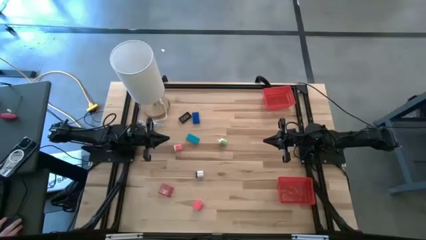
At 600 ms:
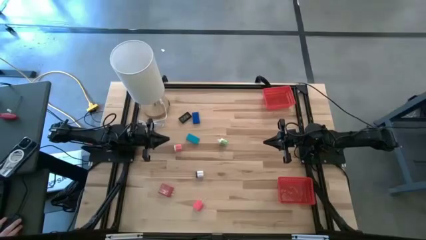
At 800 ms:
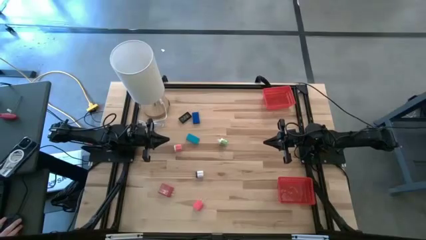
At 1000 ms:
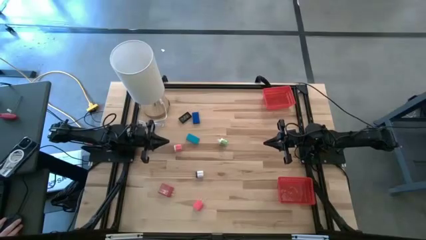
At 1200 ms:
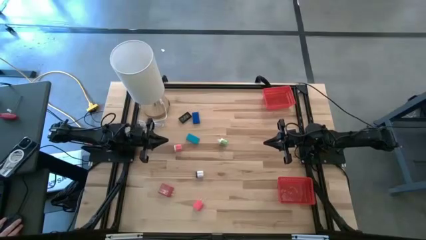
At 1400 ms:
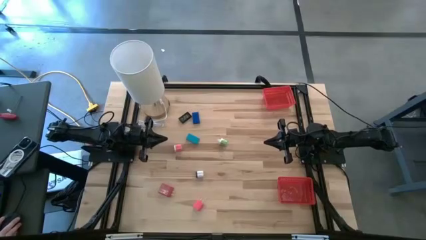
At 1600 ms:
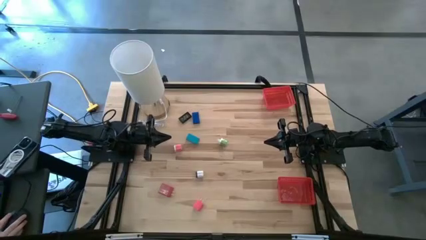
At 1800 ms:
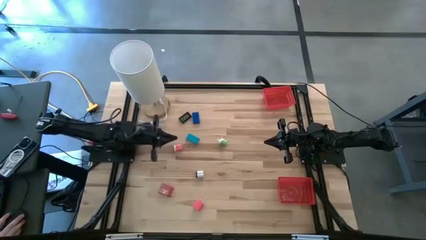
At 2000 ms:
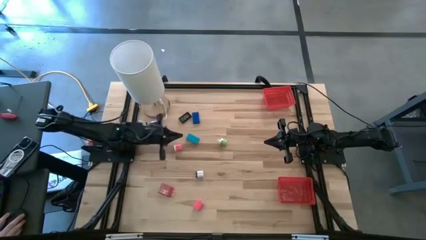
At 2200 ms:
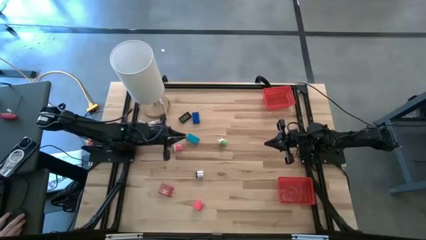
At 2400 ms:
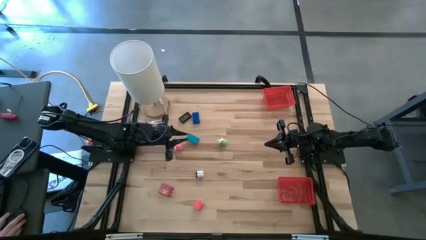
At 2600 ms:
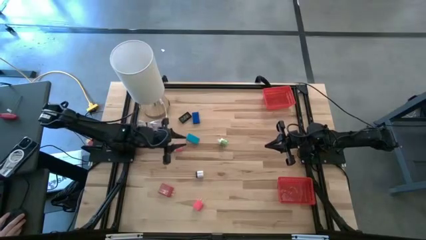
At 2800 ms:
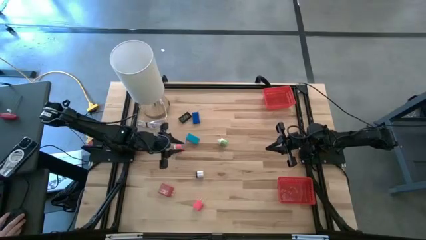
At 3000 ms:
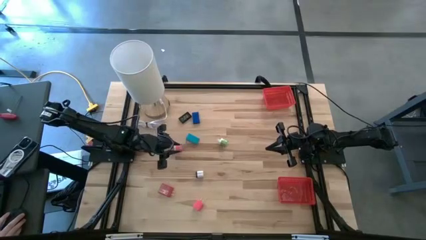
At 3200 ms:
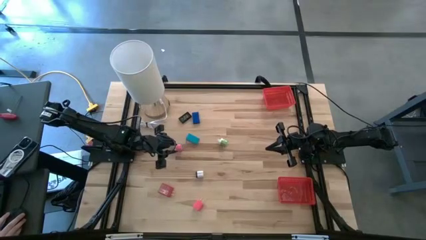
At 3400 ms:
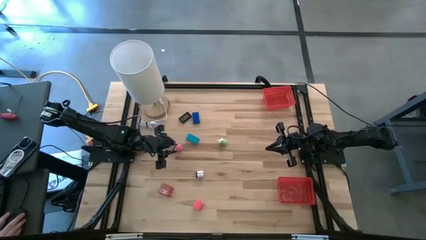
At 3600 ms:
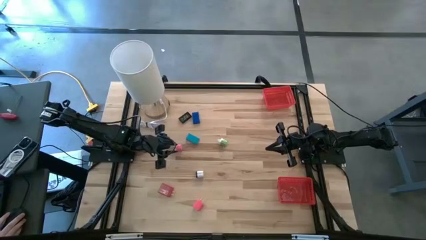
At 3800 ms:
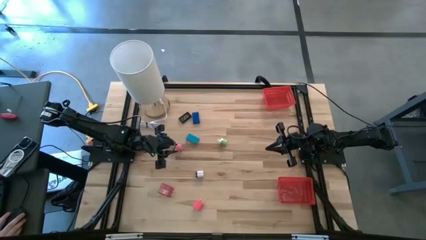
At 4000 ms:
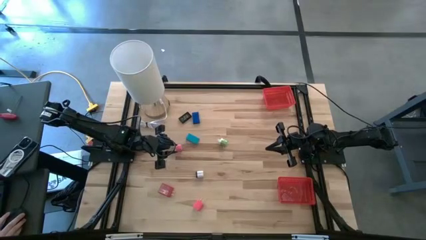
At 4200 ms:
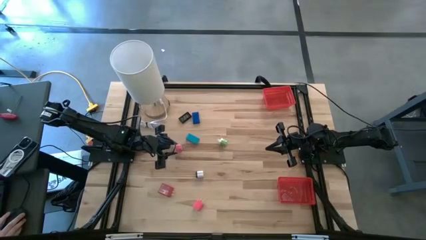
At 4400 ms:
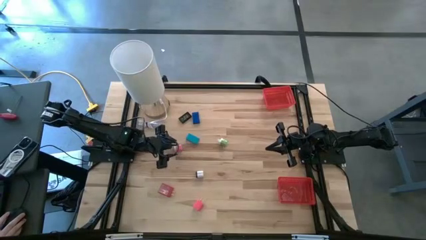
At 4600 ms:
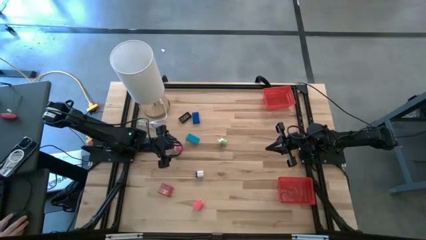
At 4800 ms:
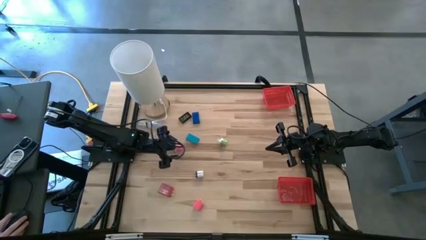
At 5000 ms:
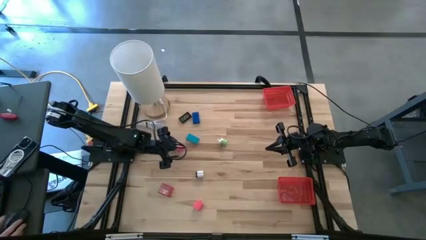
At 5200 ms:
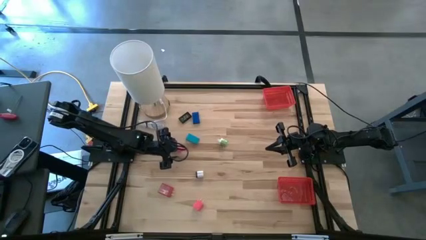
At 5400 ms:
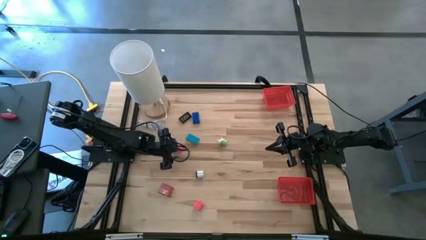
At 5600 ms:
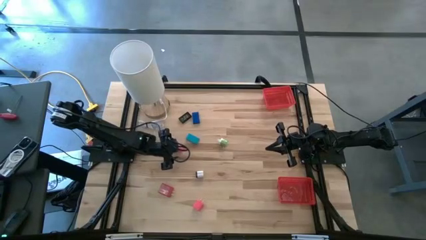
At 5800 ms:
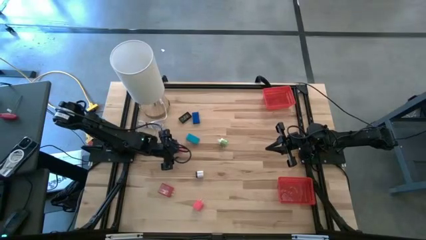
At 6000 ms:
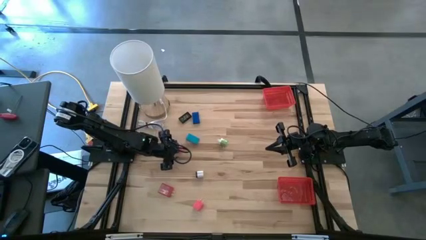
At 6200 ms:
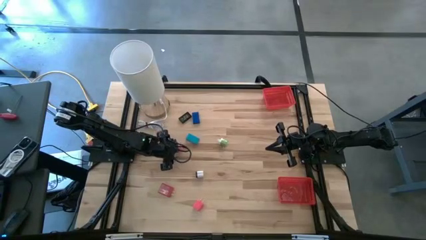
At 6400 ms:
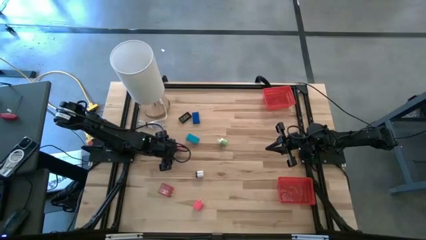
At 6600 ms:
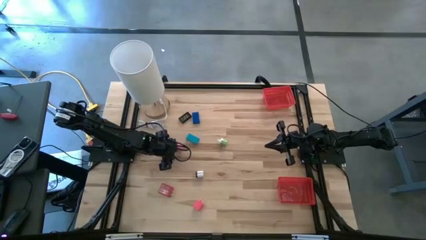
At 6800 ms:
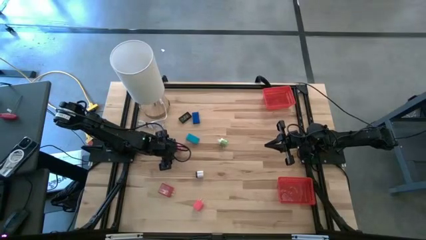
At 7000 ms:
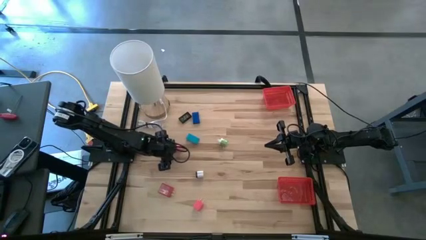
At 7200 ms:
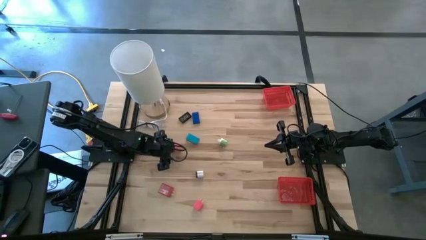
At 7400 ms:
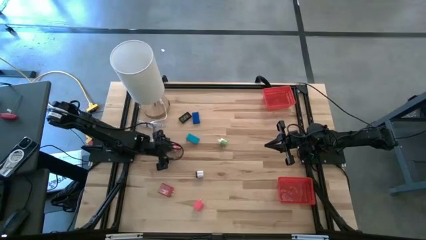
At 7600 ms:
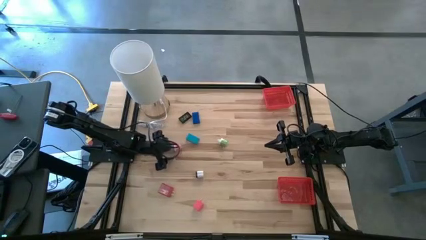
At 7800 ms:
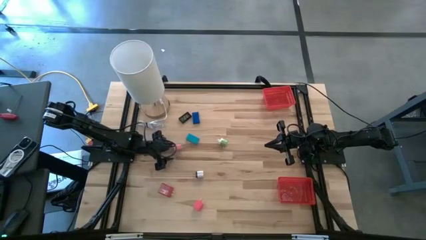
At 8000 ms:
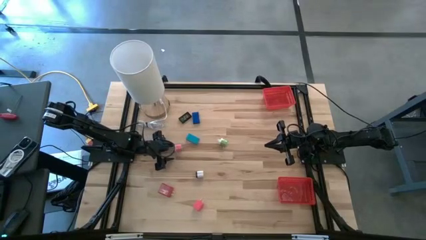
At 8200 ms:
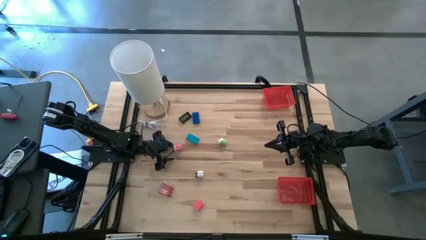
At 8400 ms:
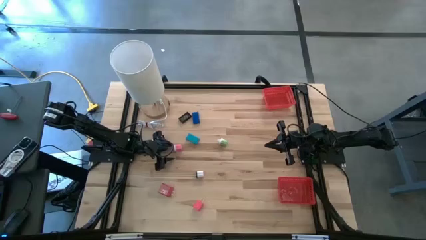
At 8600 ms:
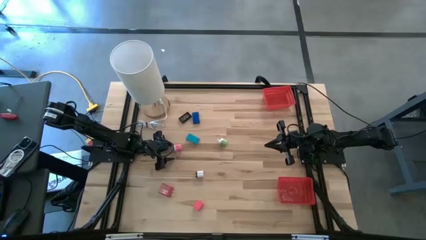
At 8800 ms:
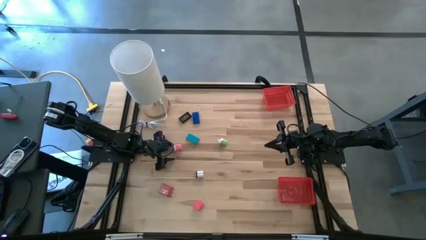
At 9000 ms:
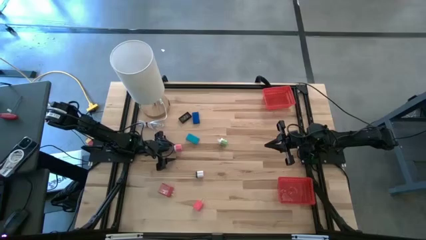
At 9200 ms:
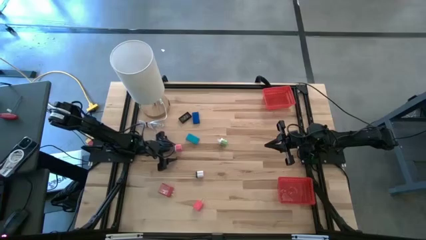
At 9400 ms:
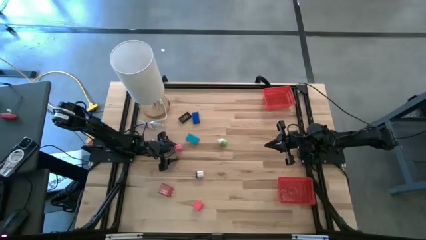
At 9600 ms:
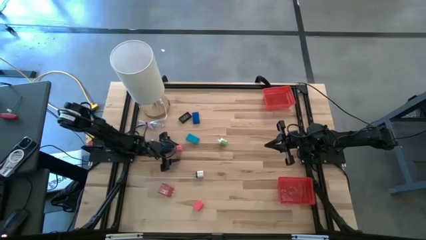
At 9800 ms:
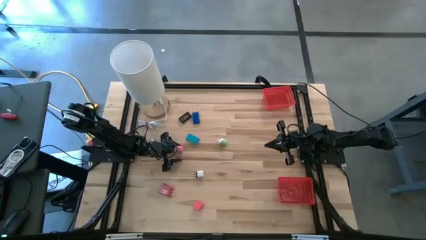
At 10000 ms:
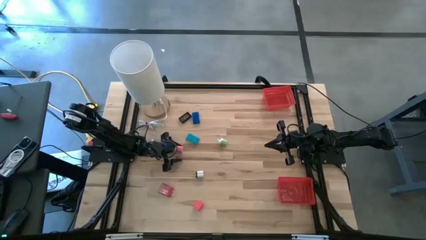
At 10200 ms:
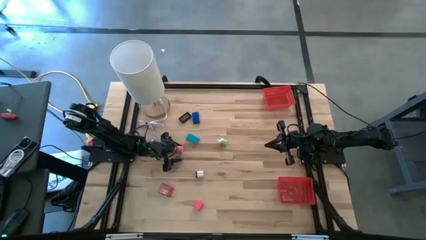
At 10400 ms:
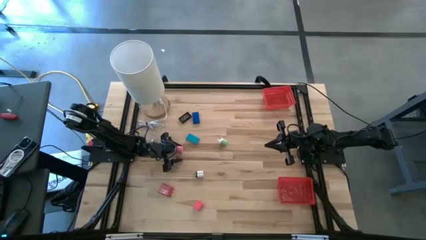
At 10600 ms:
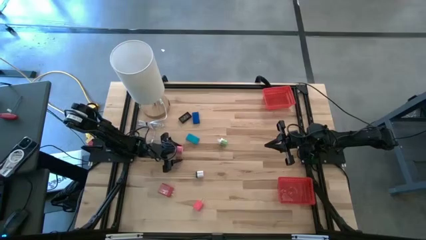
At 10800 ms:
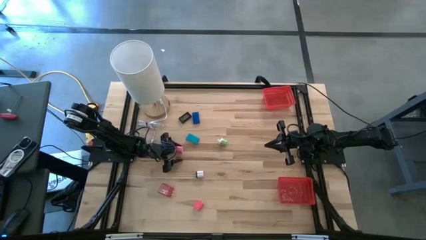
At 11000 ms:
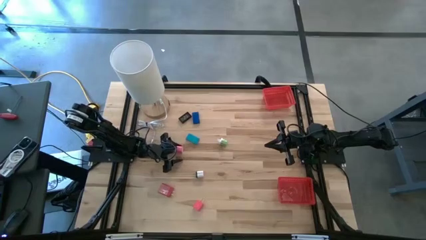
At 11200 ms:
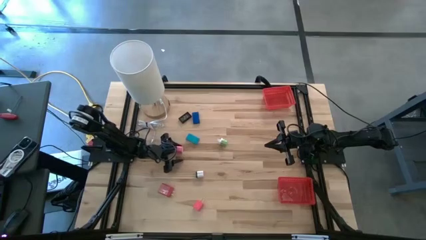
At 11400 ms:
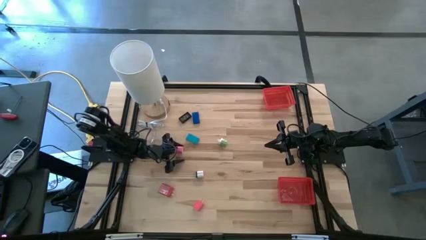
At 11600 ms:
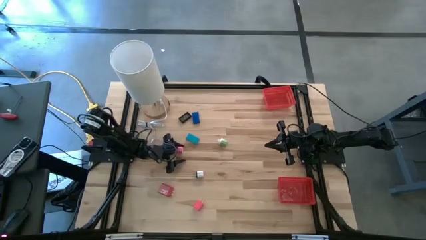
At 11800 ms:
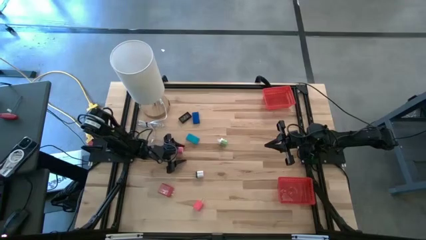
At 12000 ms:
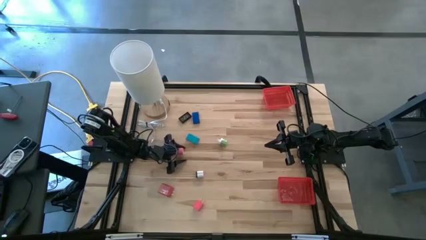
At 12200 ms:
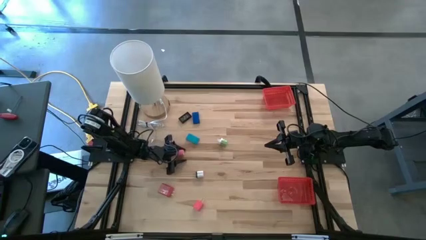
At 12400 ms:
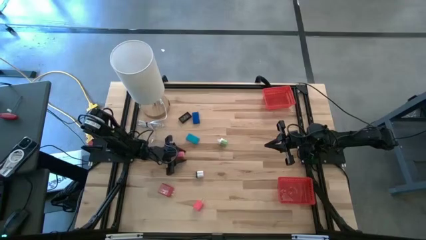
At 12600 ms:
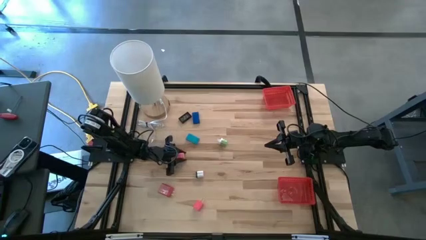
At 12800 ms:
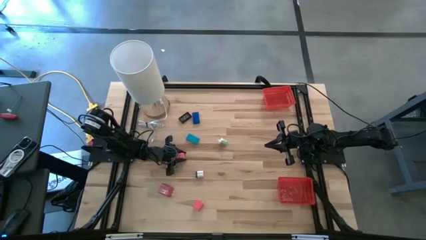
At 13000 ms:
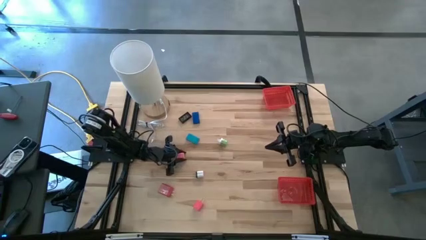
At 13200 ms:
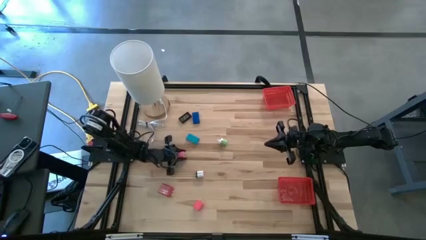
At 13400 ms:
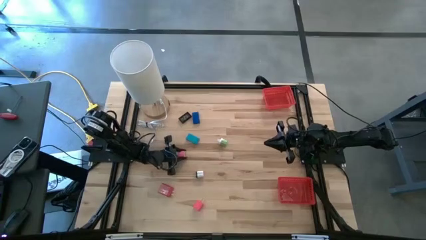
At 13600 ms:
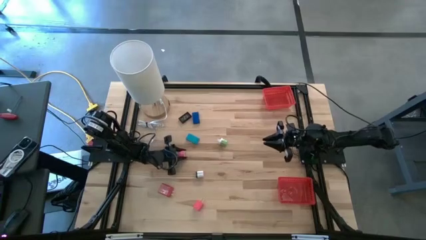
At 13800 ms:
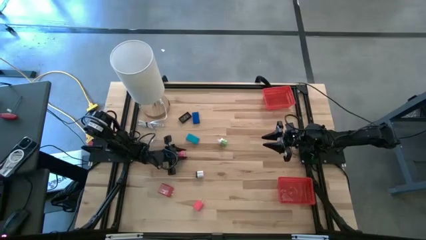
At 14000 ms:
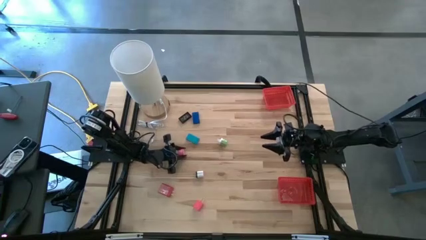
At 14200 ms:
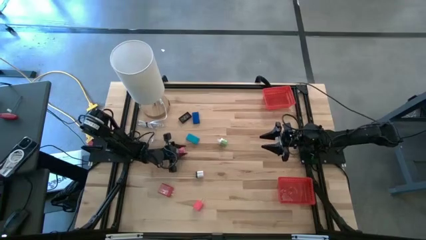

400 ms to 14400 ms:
Task: Pick & Place Office items
Put the pink white charger adapter into the top red basket
